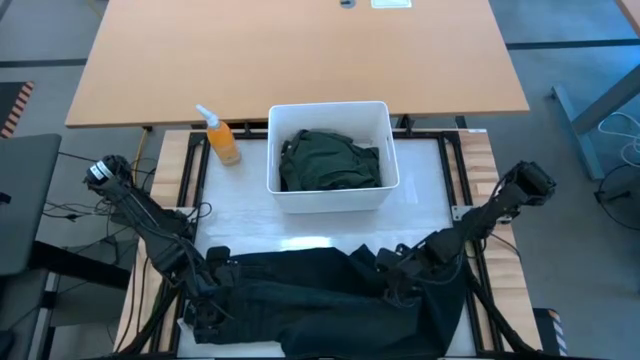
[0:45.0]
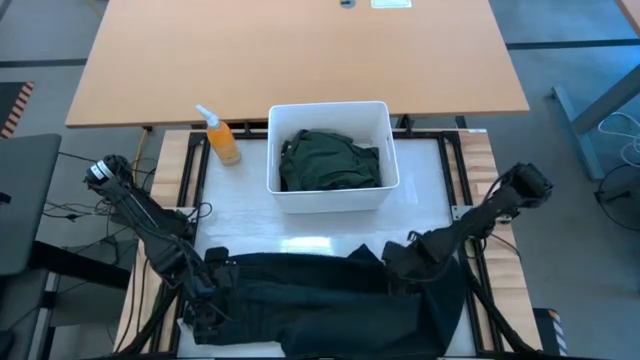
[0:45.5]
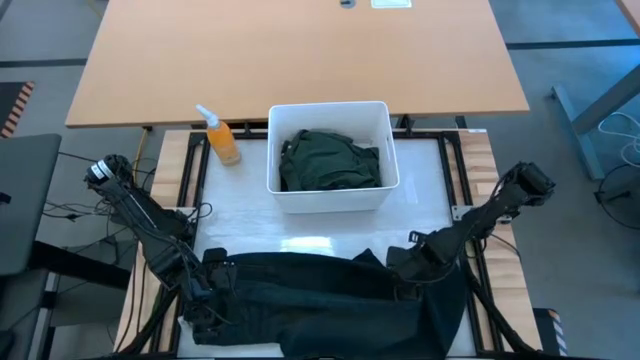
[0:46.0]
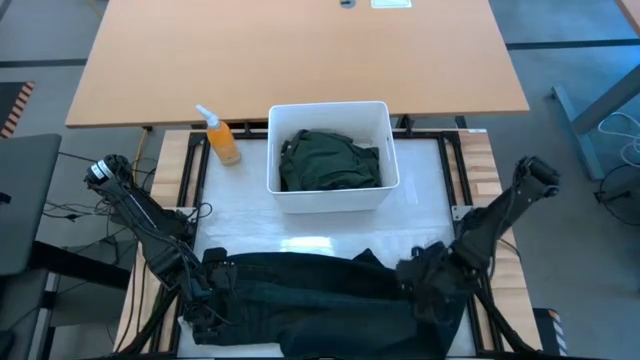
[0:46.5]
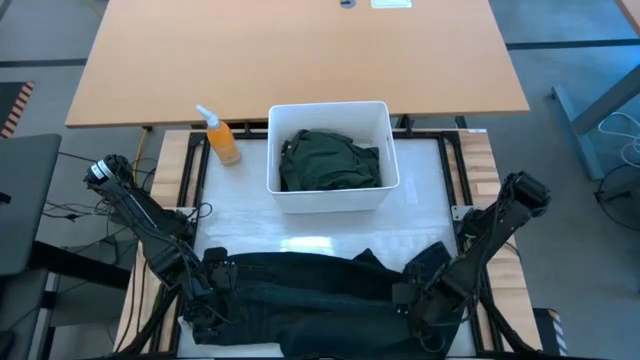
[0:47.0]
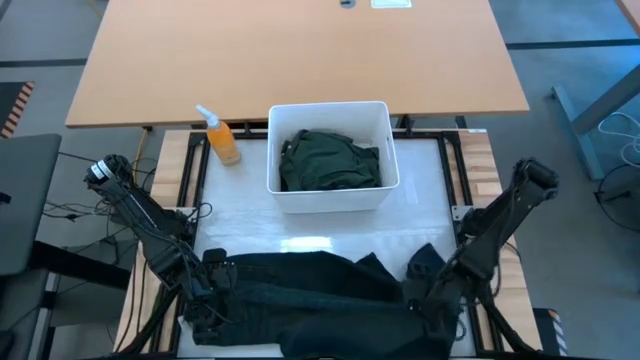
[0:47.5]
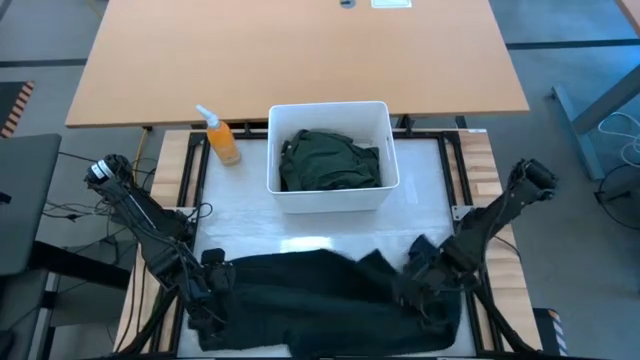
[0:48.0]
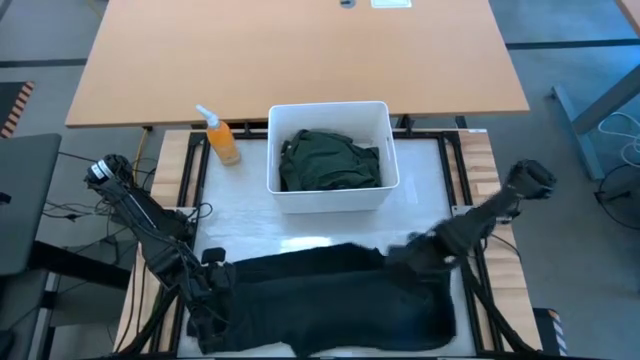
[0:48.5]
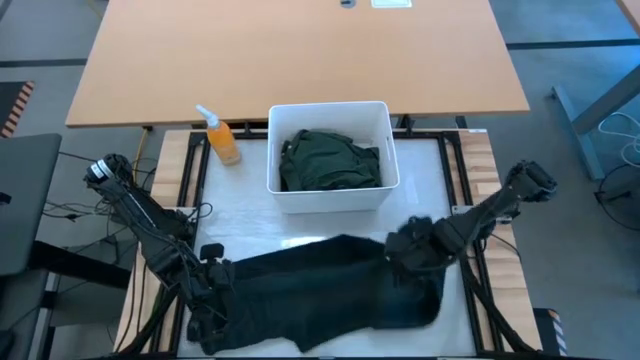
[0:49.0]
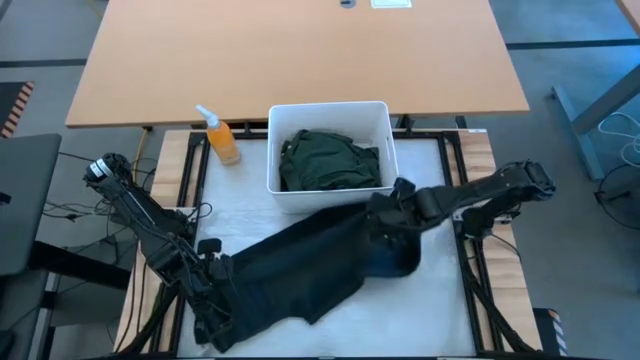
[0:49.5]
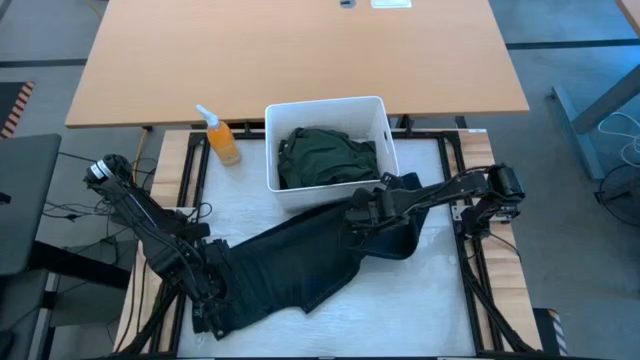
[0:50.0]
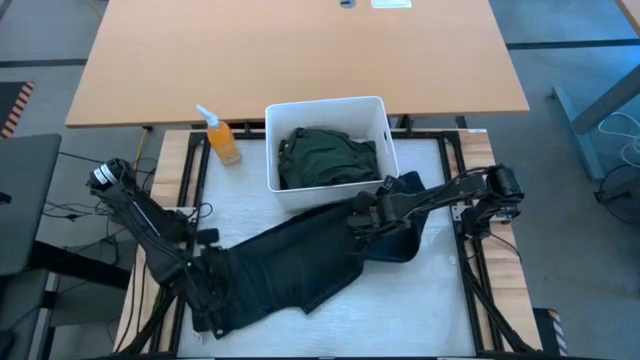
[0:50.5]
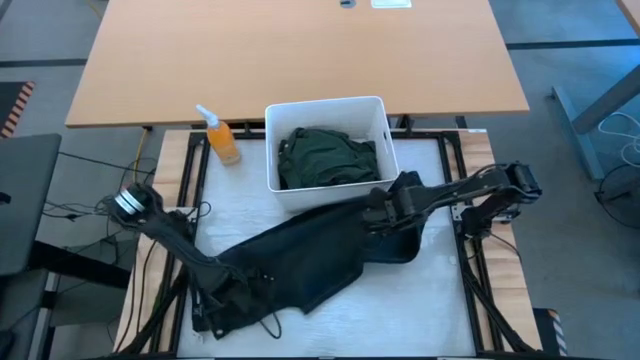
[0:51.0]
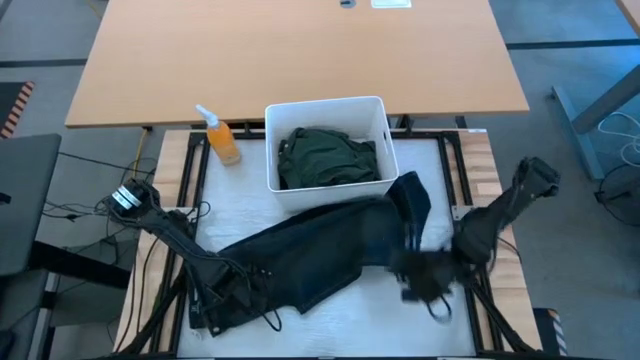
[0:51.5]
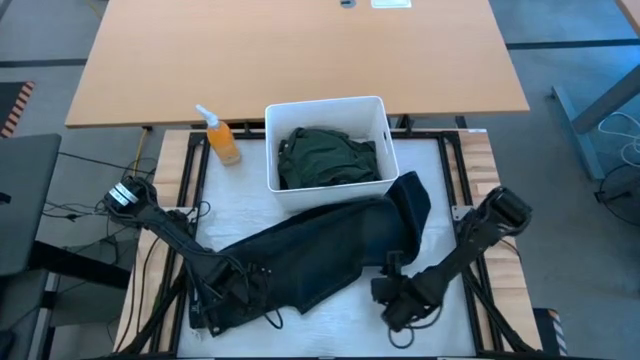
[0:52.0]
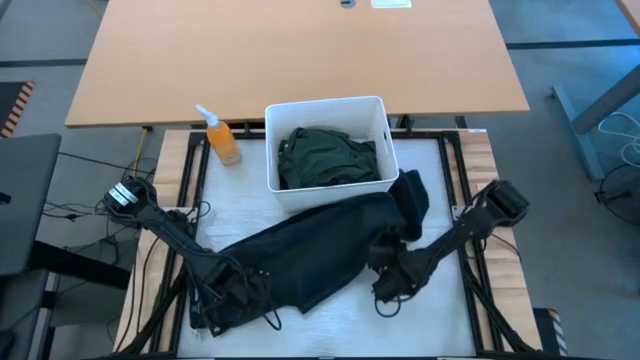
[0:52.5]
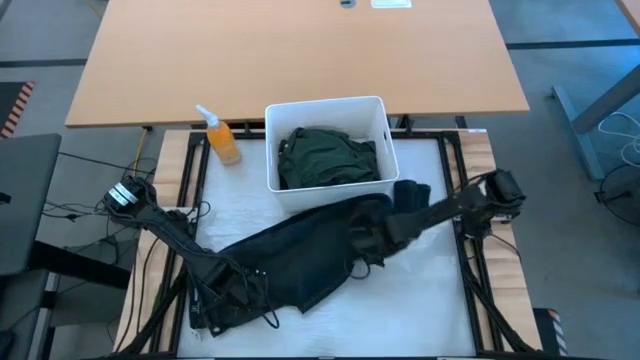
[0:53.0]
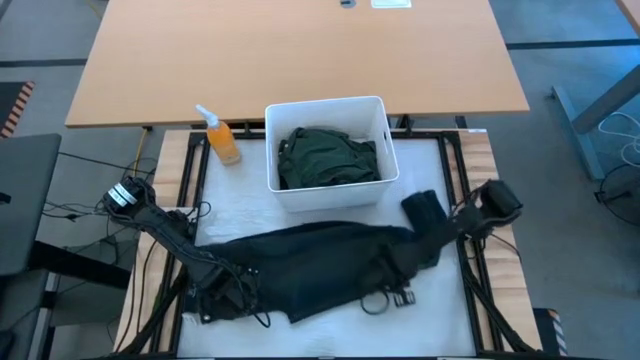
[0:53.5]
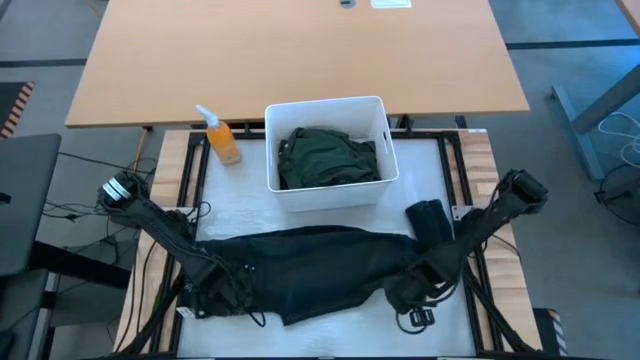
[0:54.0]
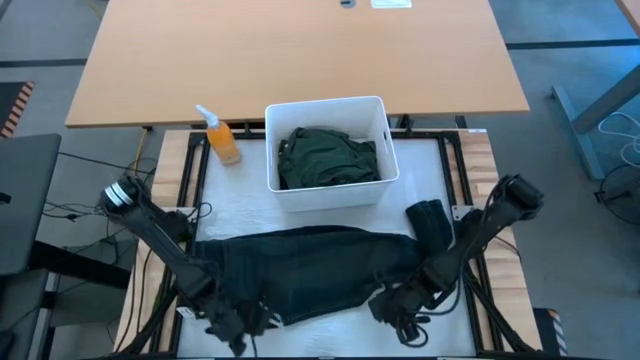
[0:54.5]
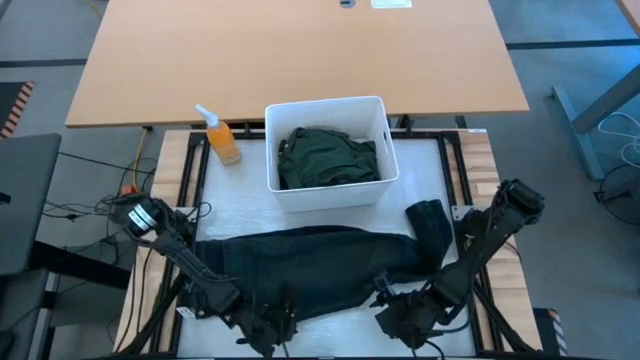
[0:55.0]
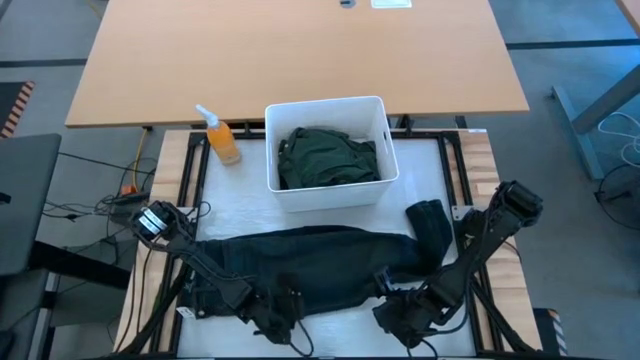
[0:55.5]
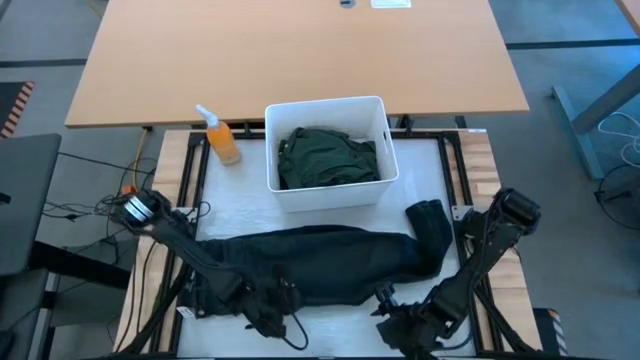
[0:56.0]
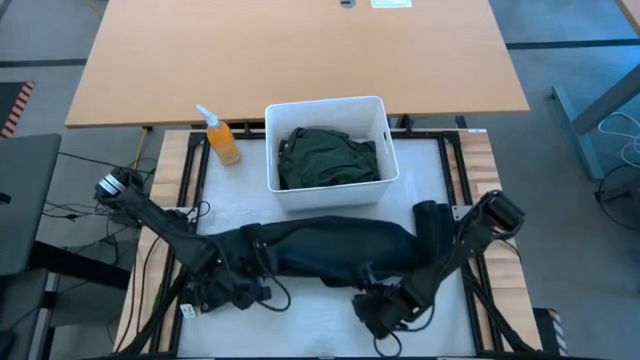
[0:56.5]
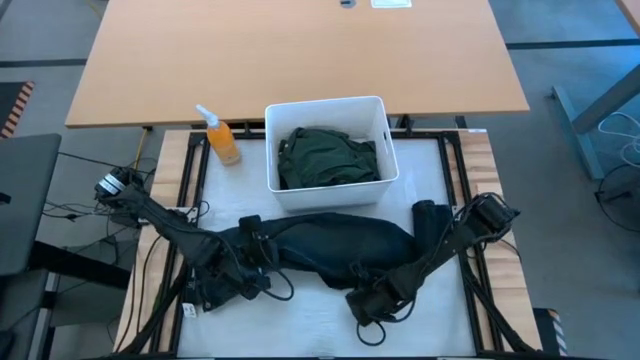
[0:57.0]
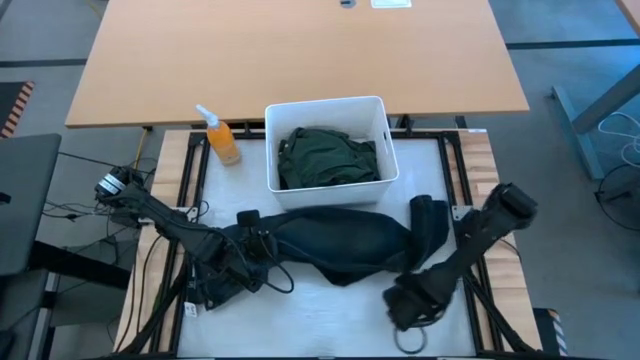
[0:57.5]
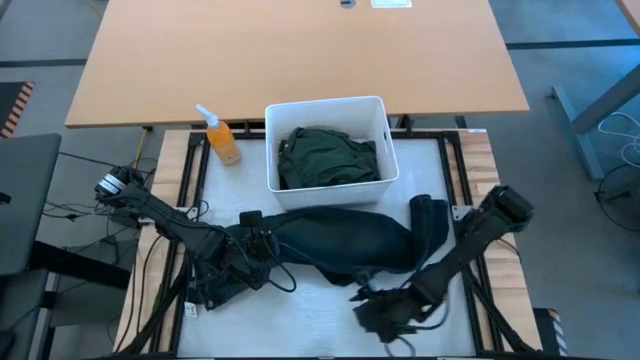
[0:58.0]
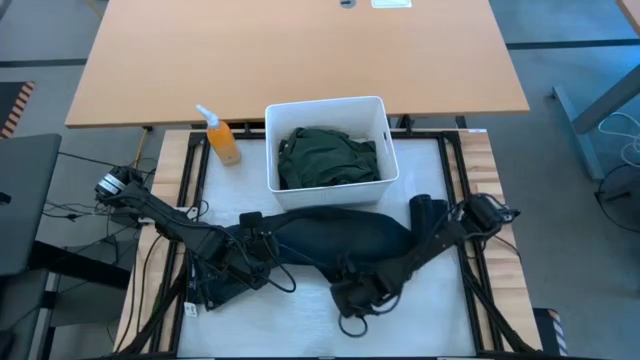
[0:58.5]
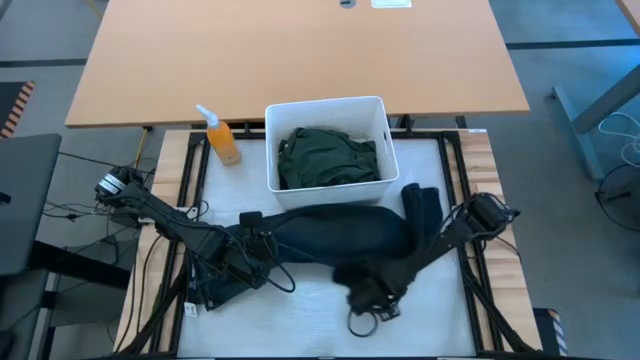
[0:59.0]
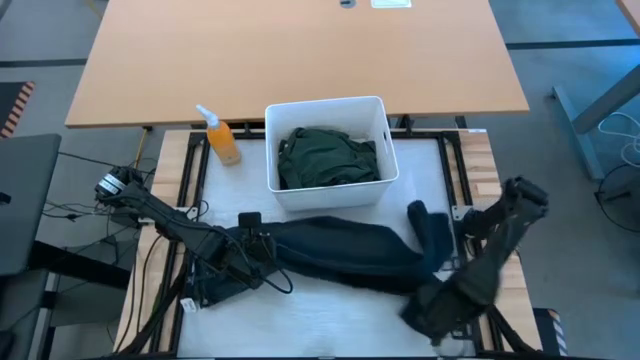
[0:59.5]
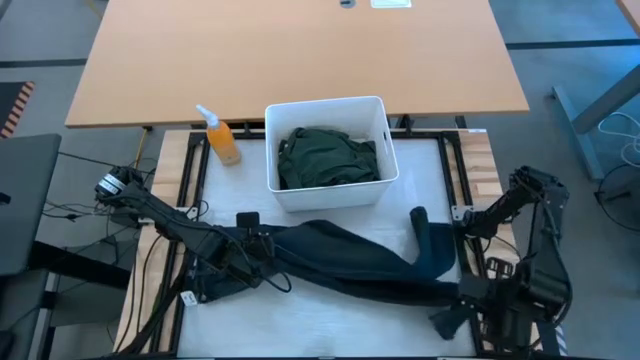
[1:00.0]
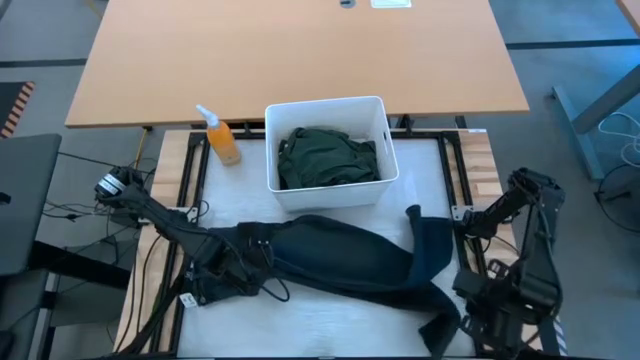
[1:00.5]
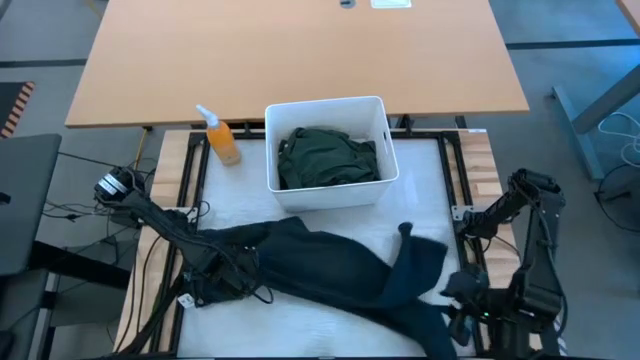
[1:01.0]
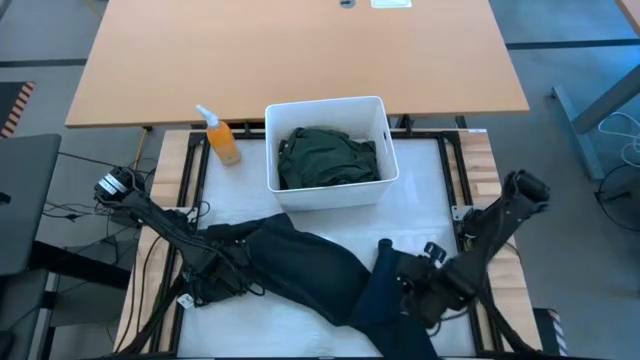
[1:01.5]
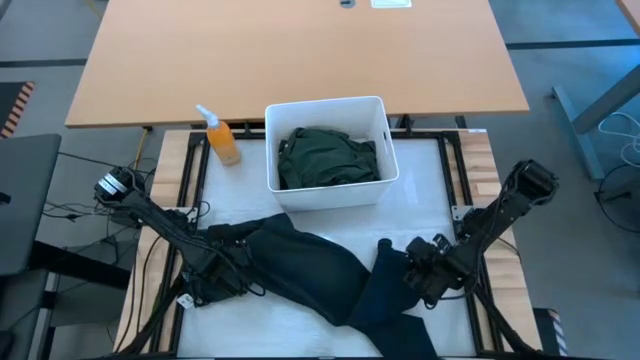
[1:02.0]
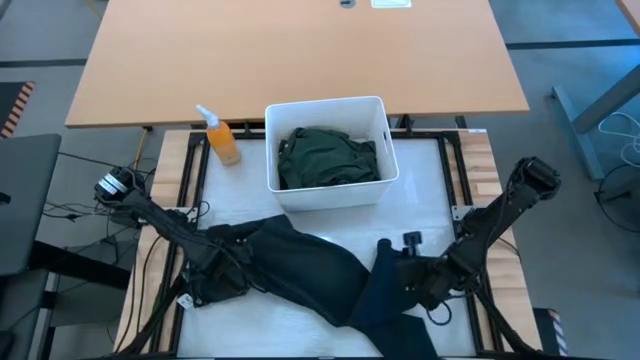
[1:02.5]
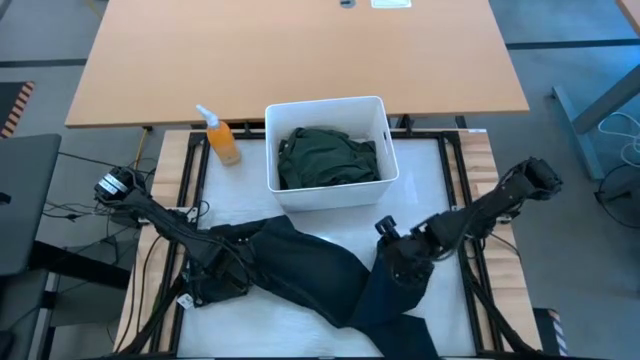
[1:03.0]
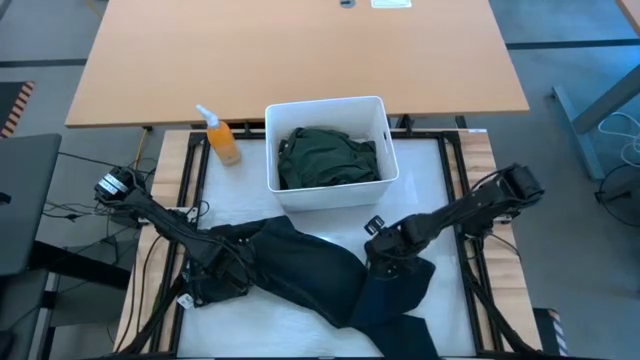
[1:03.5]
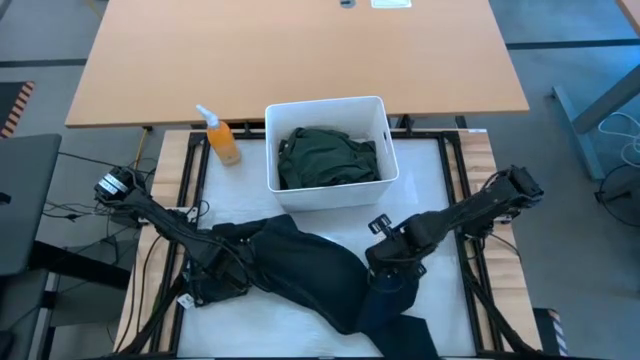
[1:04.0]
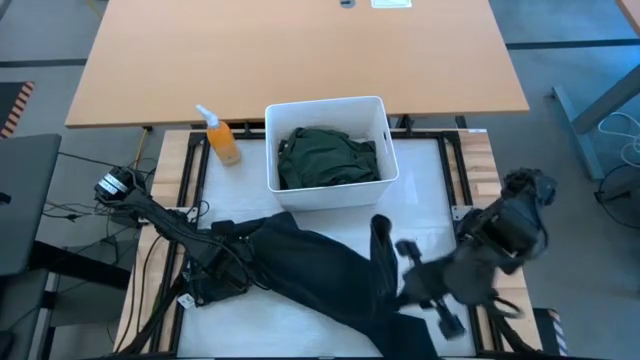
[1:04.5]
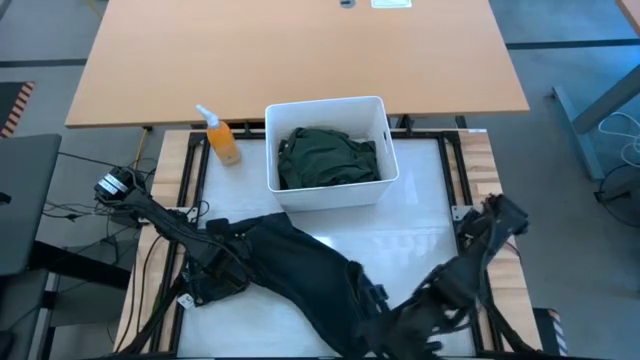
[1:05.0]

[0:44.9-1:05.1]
Task: Fold laundry
Fold the dark blue jeans
